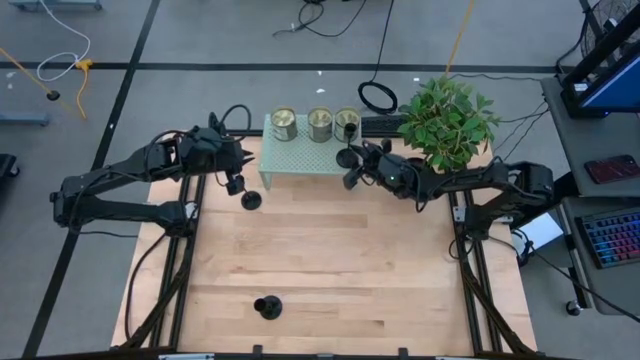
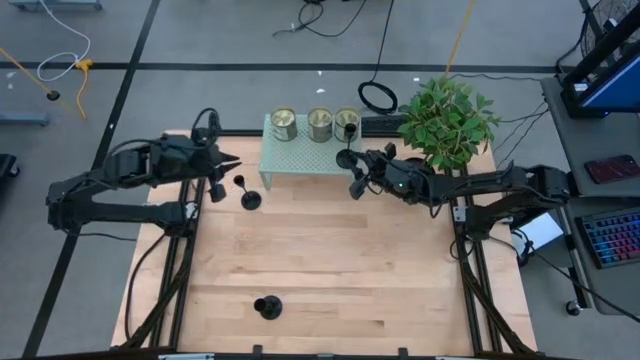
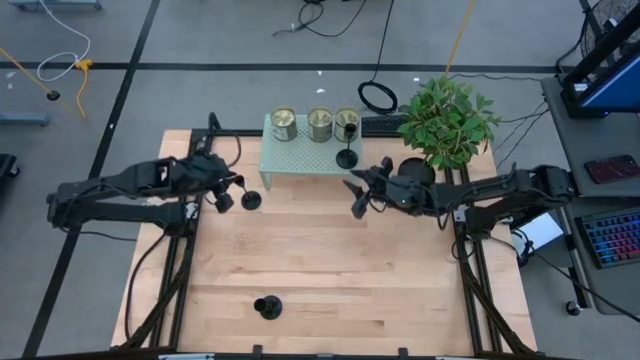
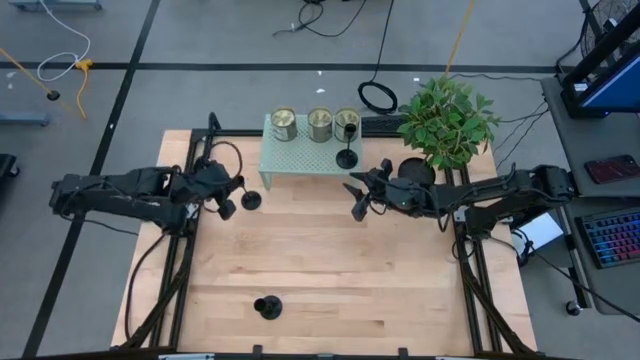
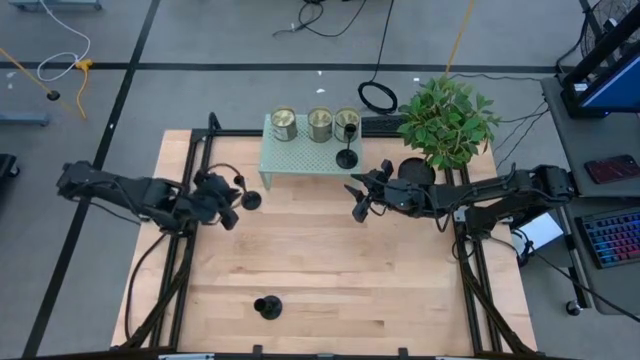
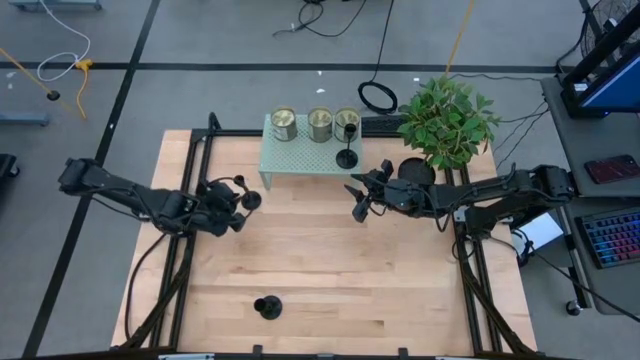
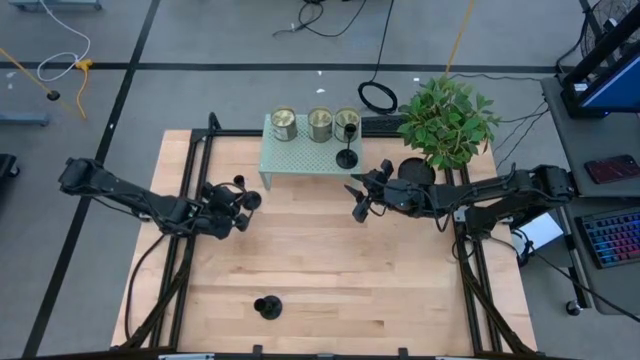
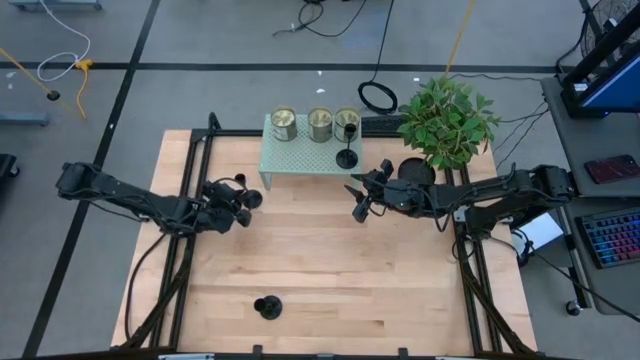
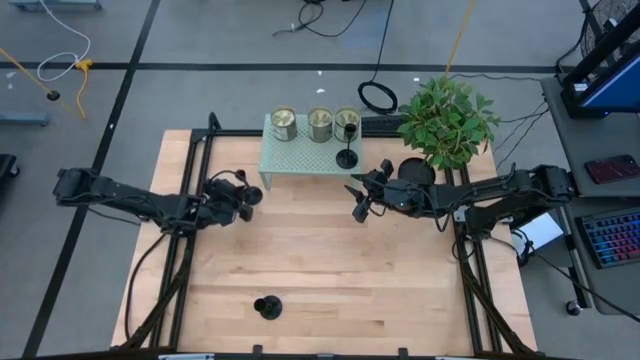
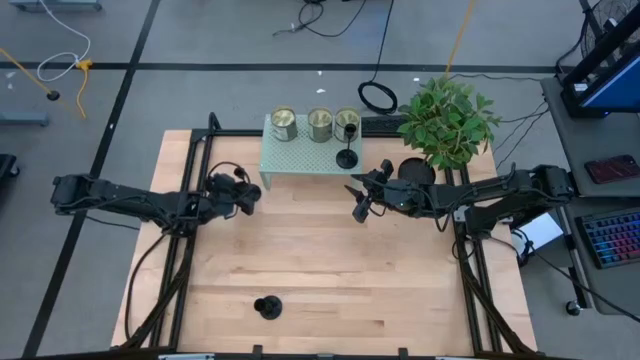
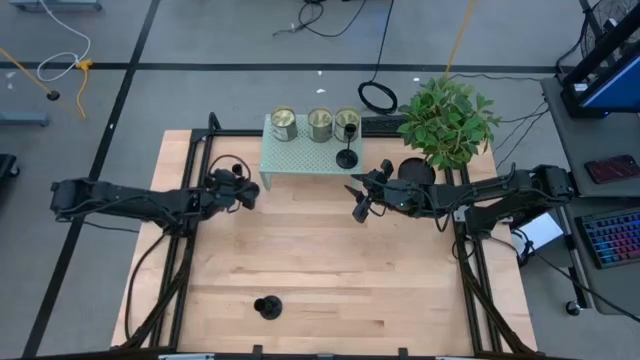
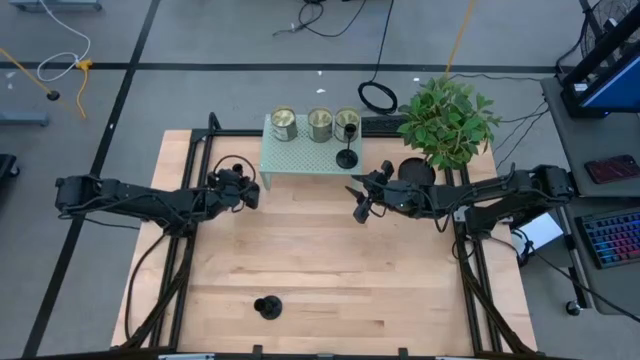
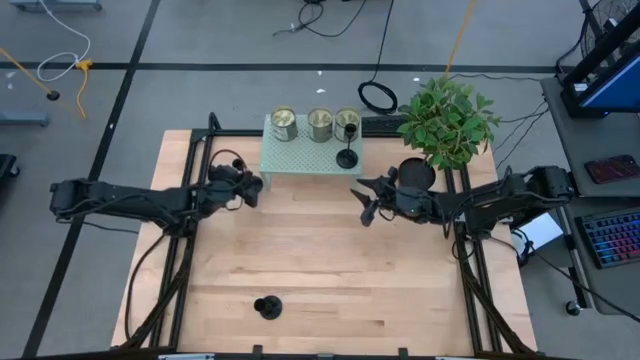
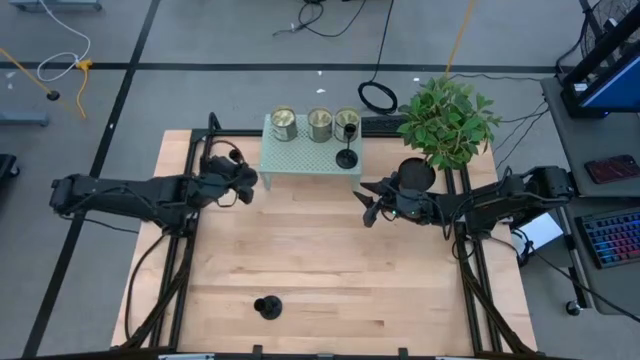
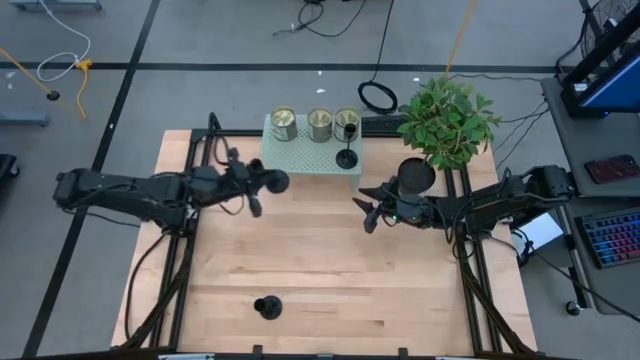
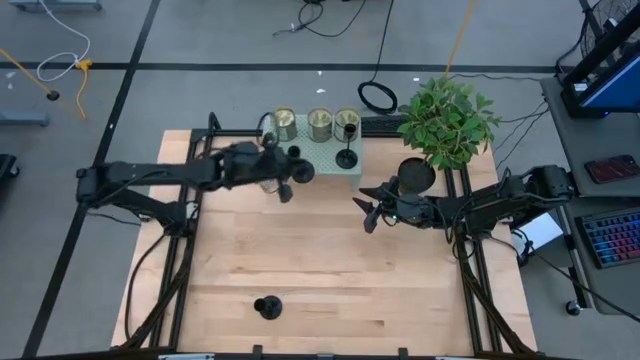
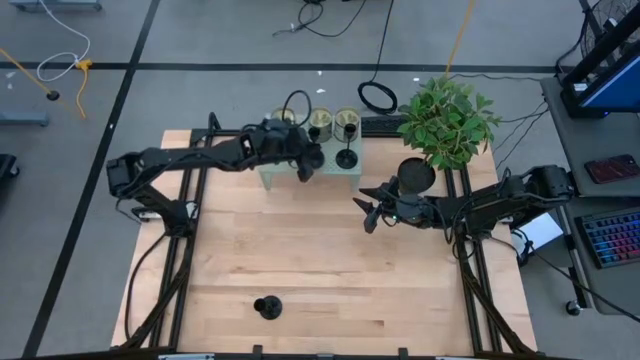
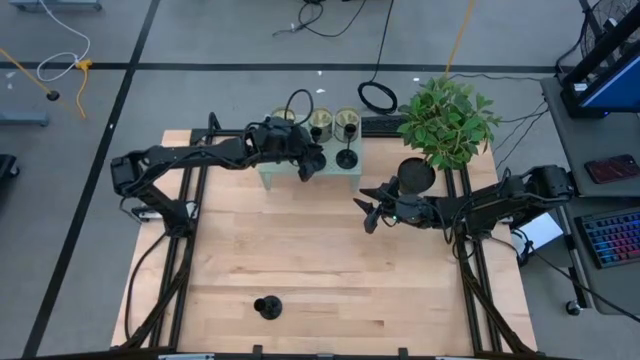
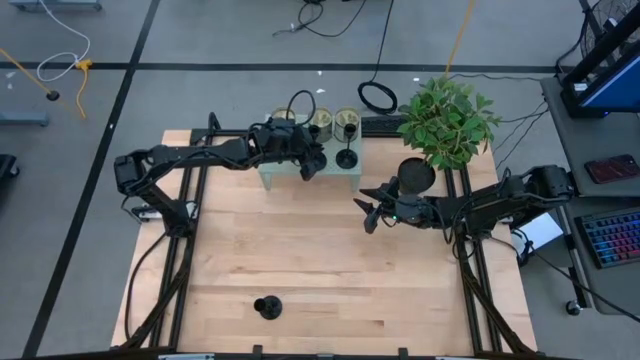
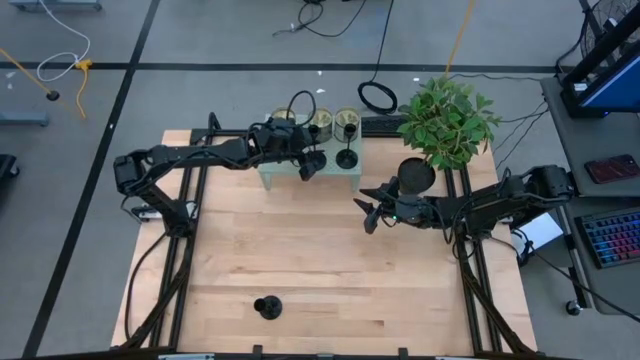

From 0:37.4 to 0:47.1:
Task: Pick & Place candle stick holders
Put the top candle holder on the shelf

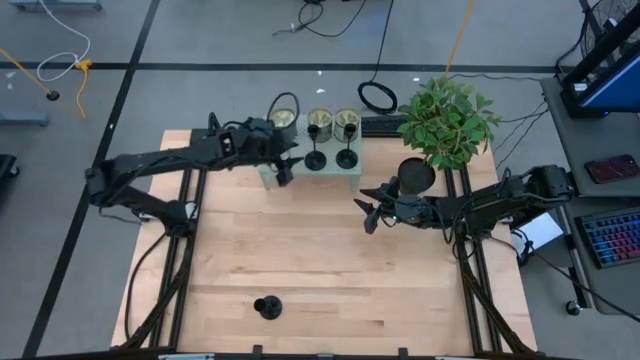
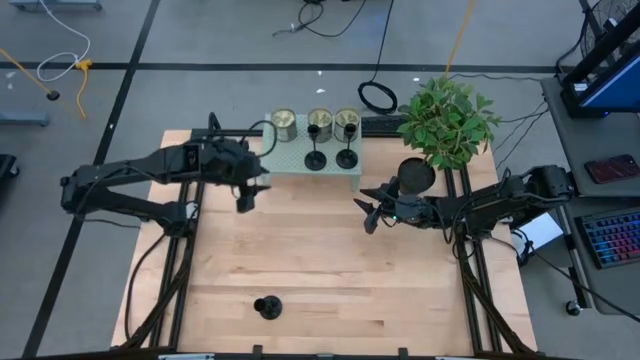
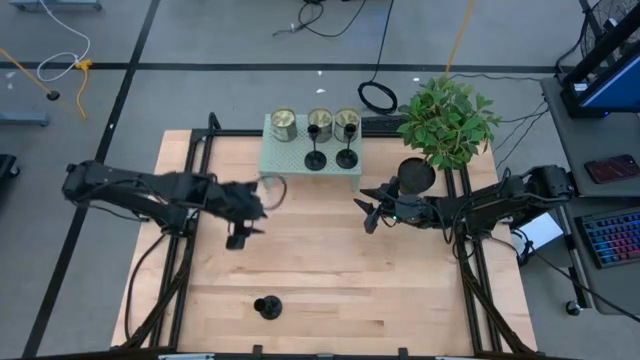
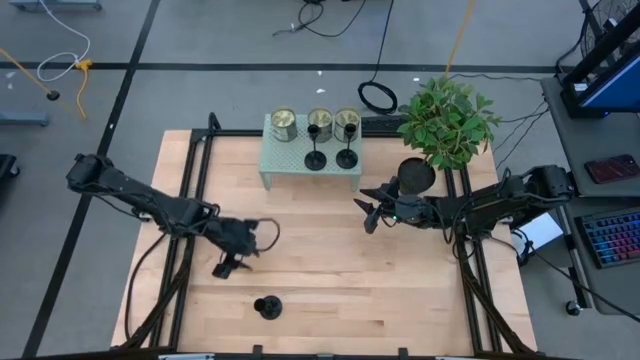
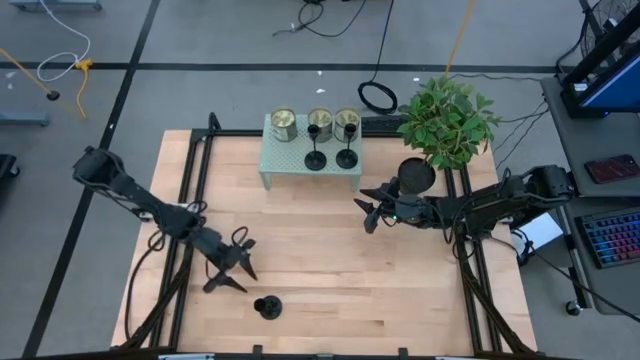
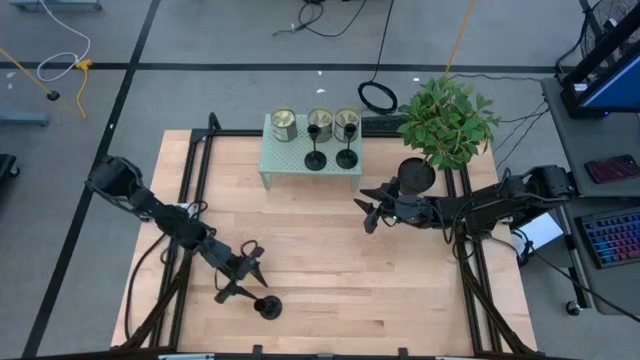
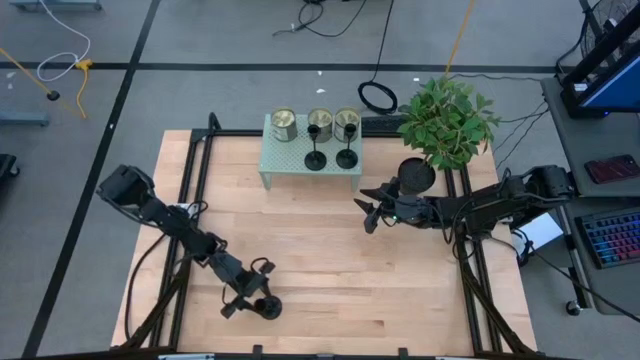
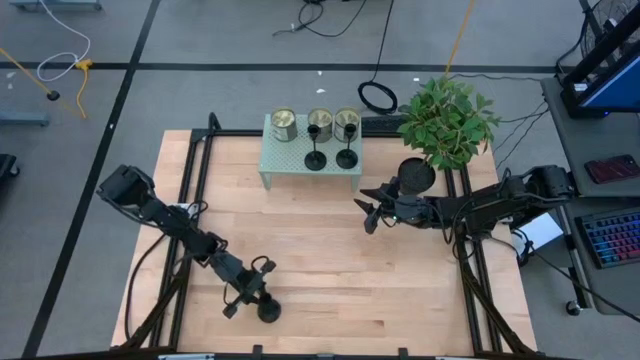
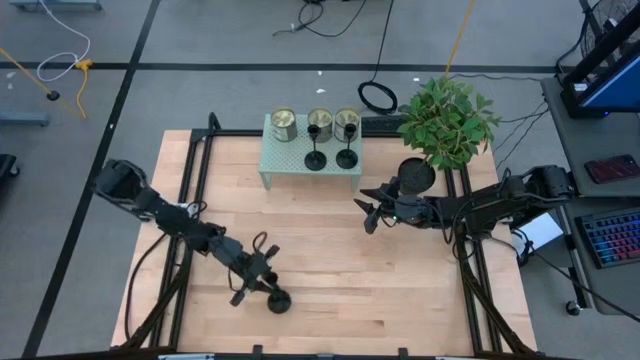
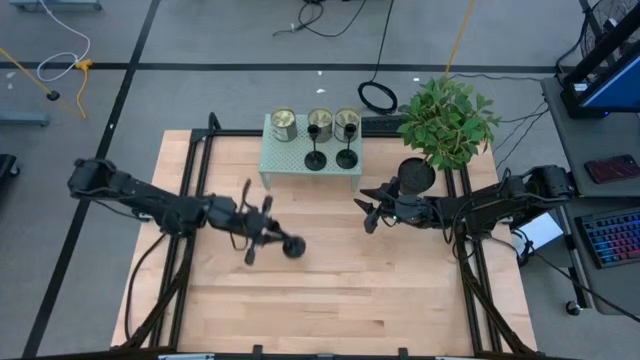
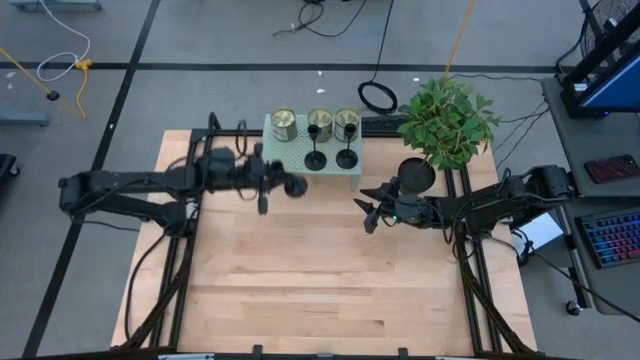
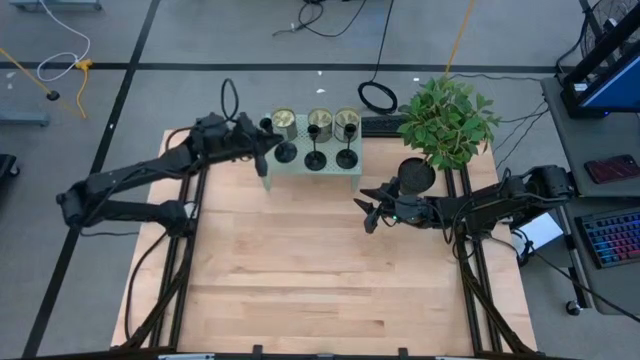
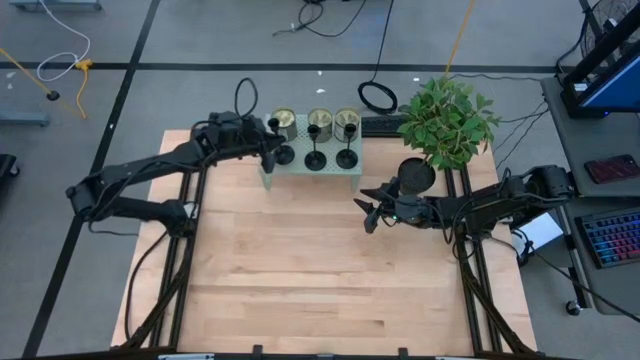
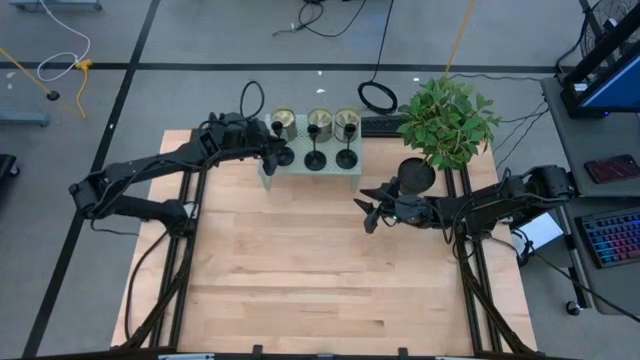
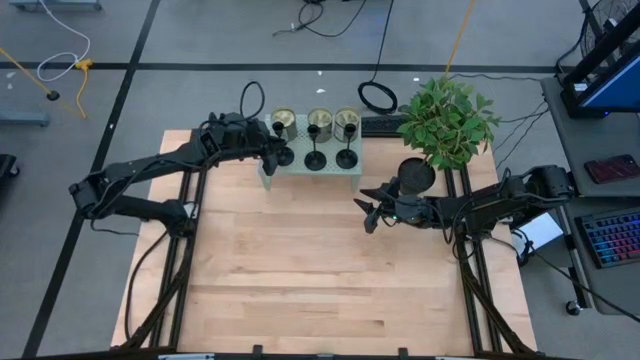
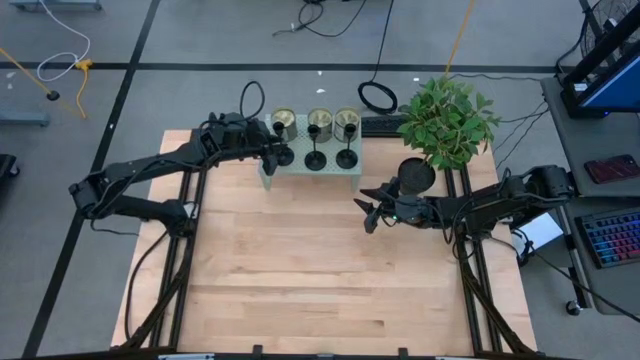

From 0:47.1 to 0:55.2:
Put the candle holder on the shelf

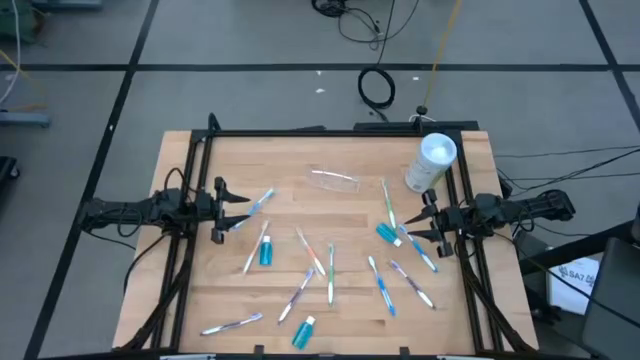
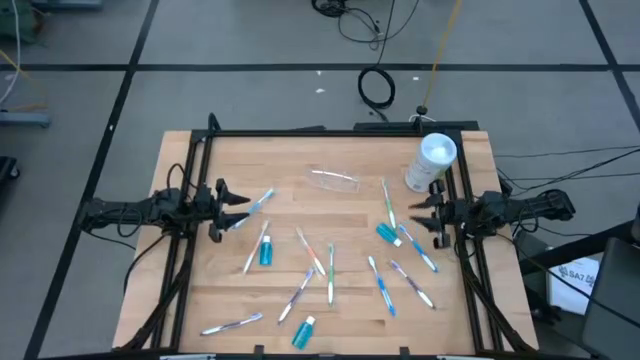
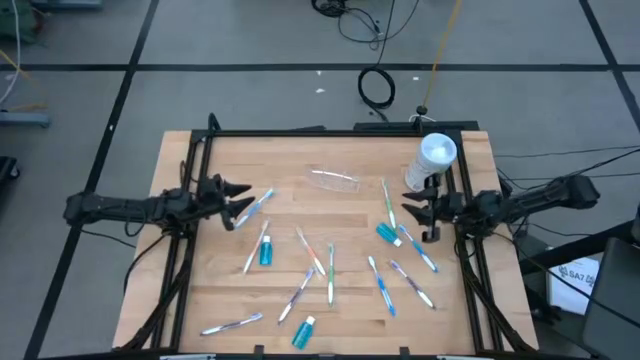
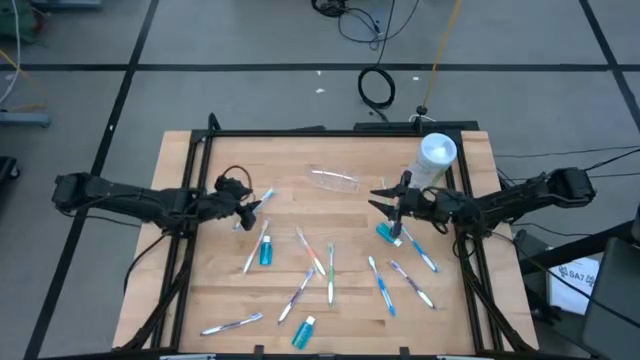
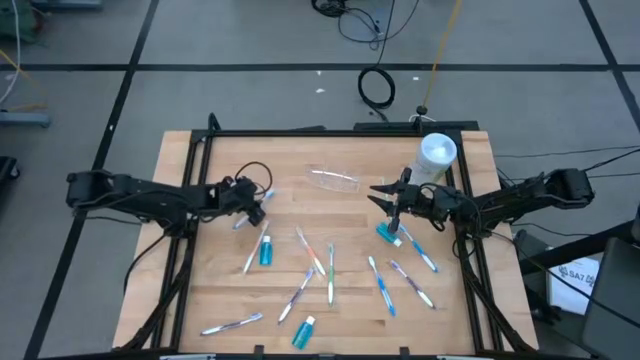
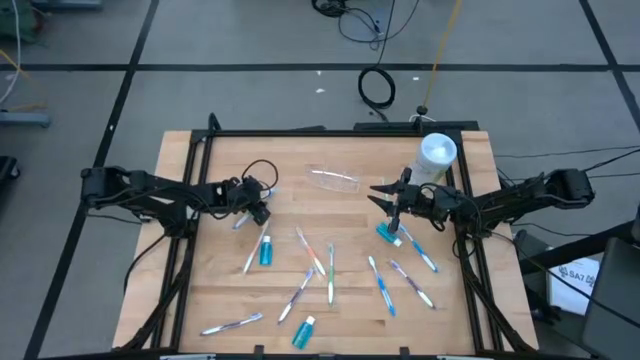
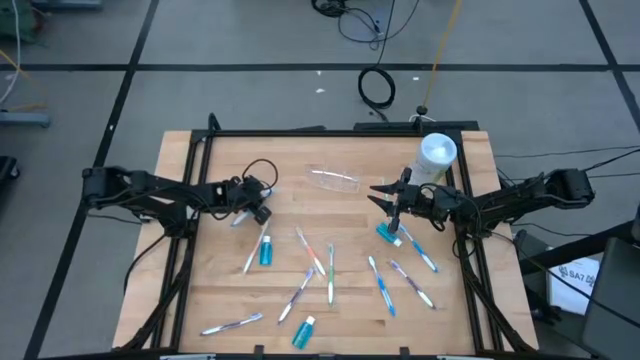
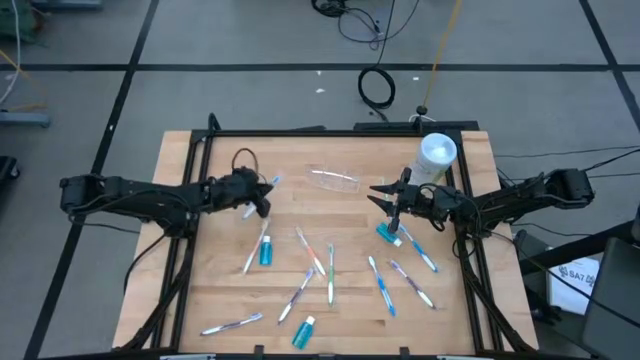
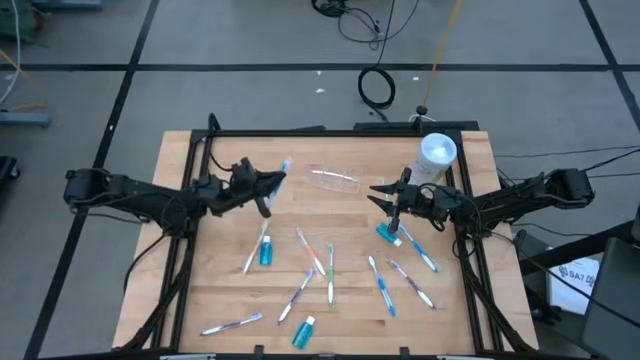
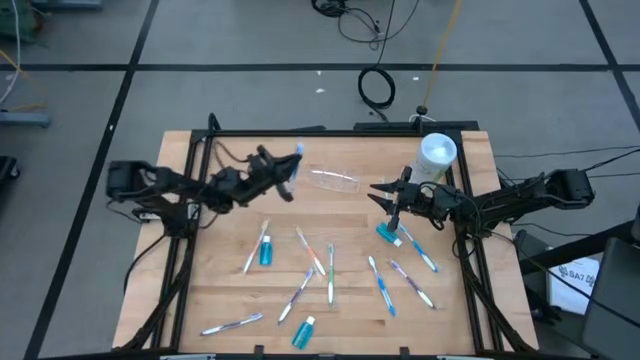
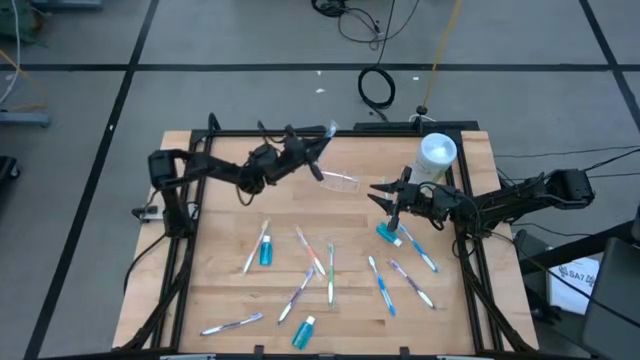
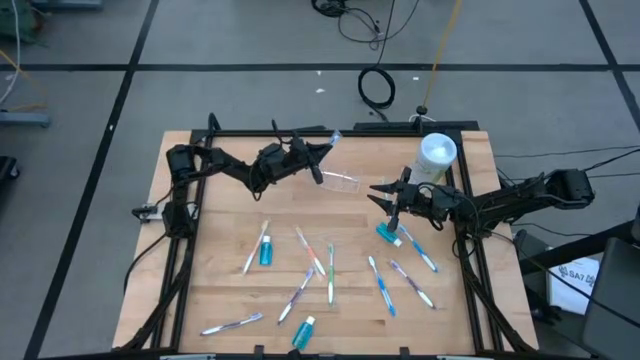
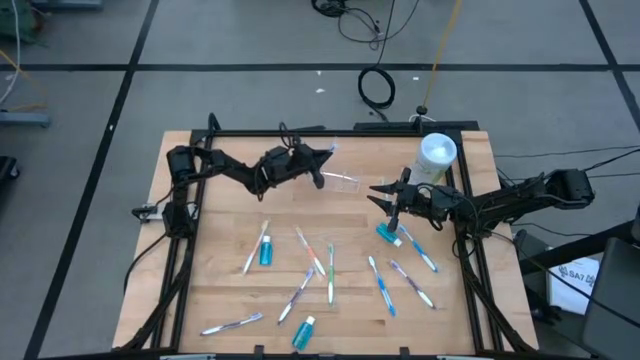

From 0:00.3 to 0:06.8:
Task: Pick & Place toothbrushing station
Put the top blue toothbrush into the transparent organizer
